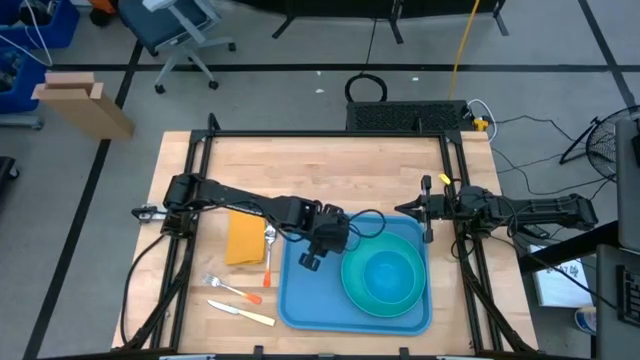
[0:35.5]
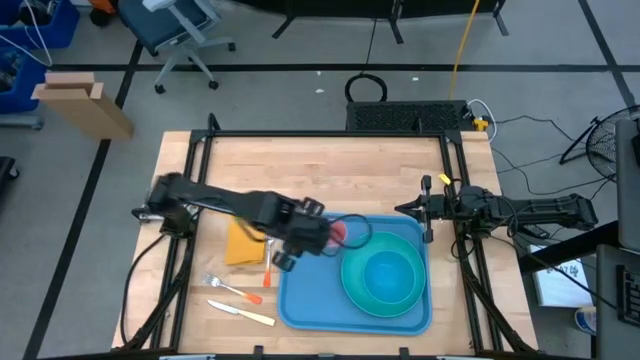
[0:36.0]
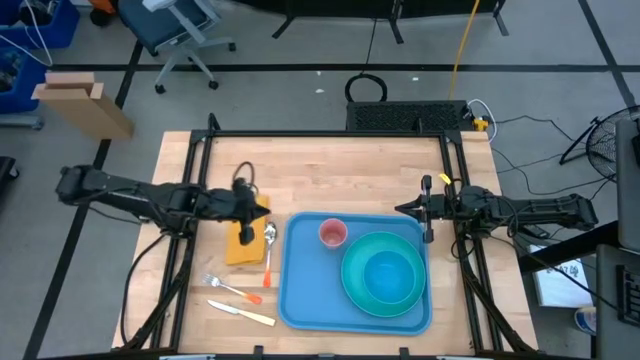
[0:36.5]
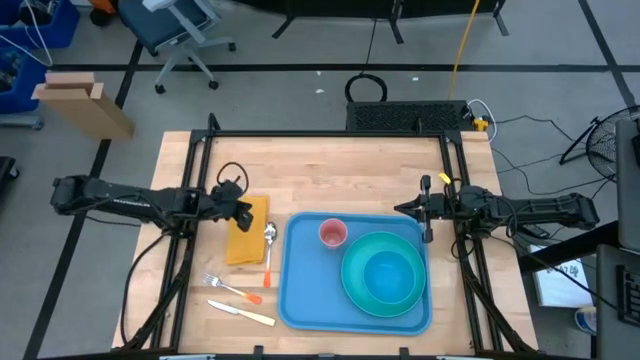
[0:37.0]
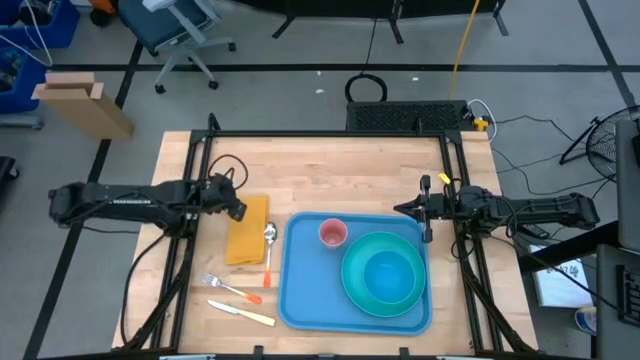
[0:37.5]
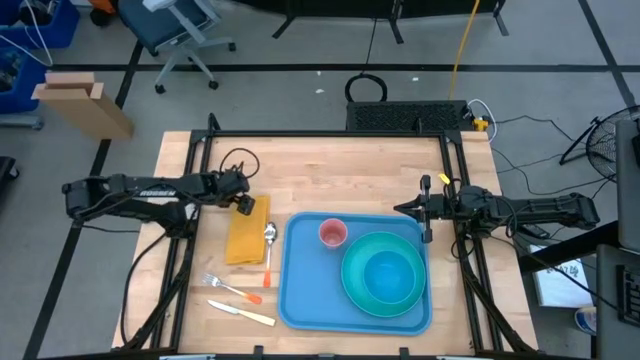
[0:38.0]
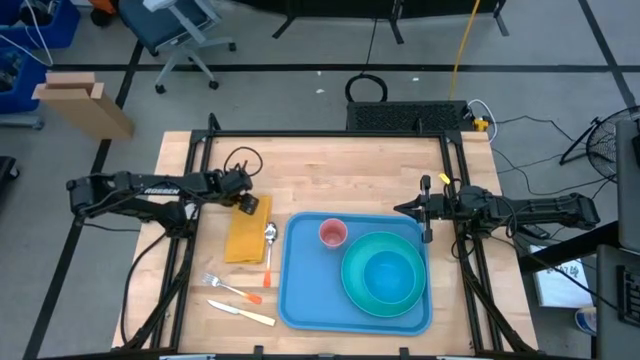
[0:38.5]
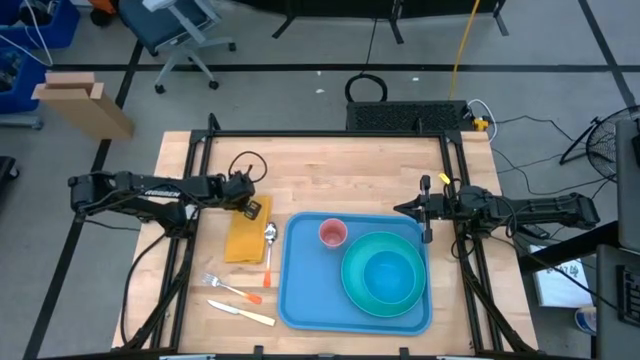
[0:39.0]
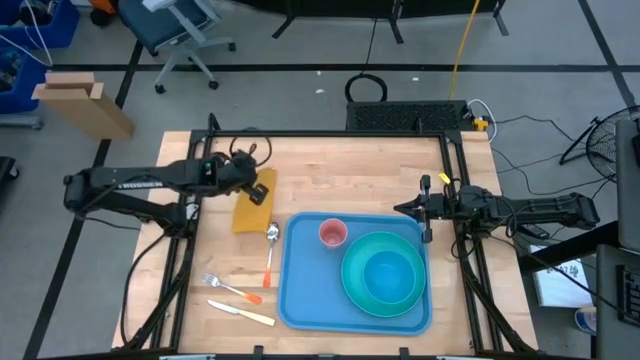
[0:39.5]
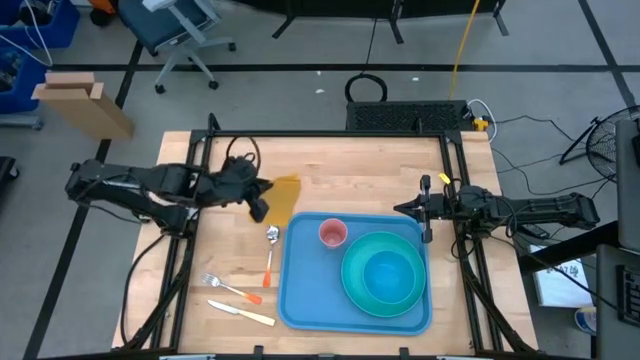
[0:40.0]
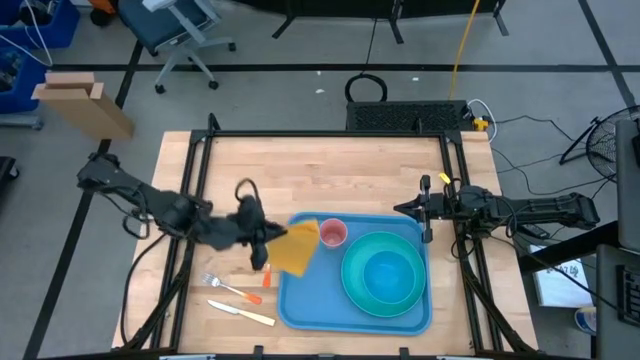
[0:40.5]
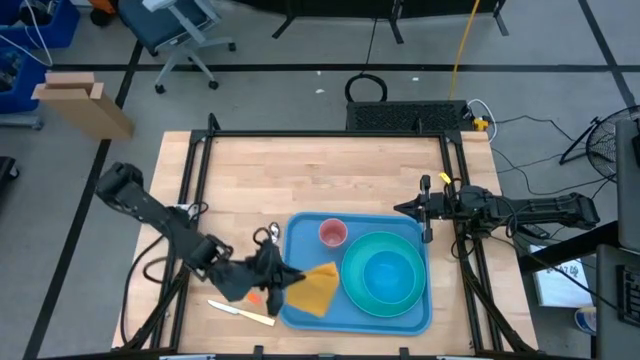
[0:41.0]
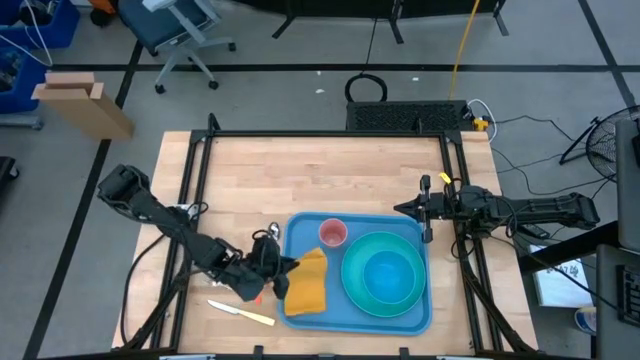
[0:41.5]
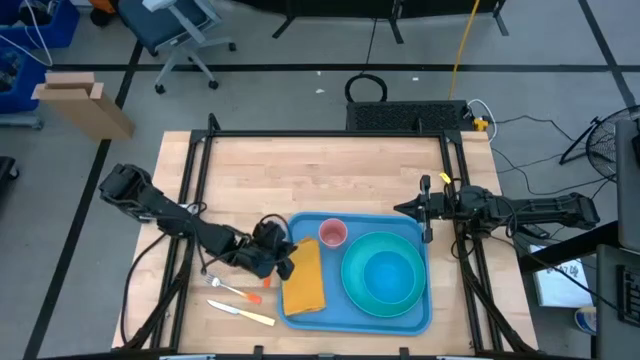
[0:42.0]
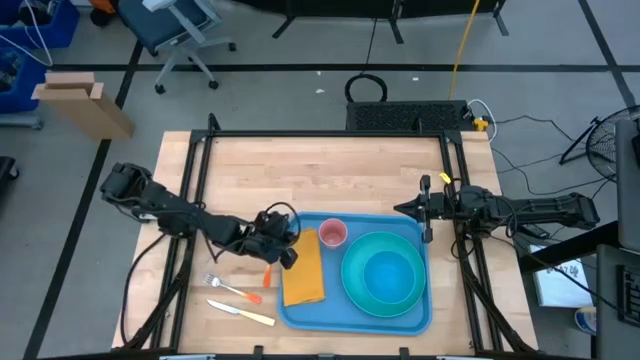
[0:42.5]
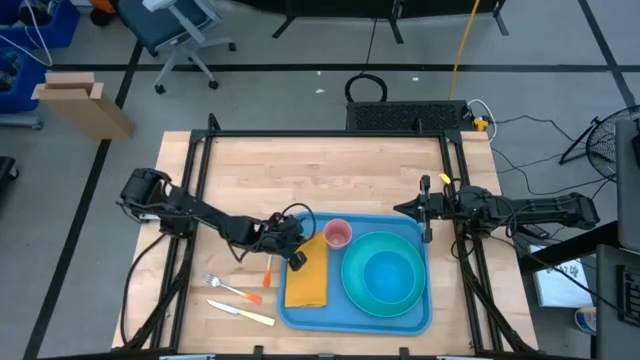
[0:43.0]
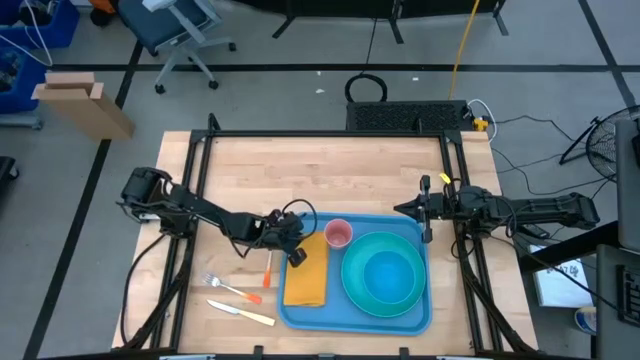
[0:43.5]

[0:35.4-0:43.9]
Task: Set up tray
Put the yellow napkin on the left of the light blue tray

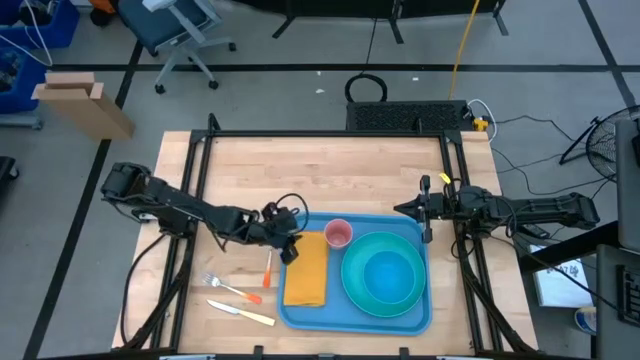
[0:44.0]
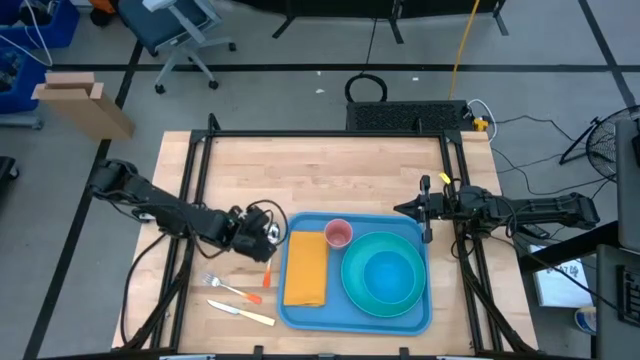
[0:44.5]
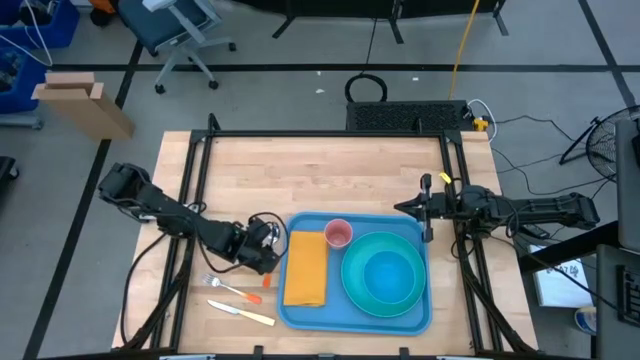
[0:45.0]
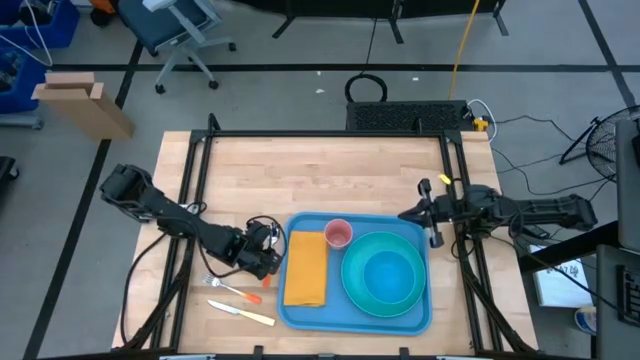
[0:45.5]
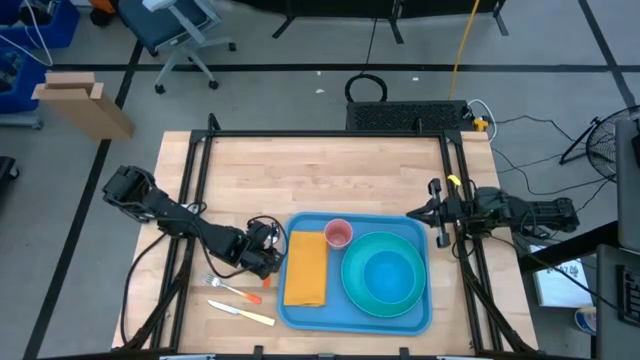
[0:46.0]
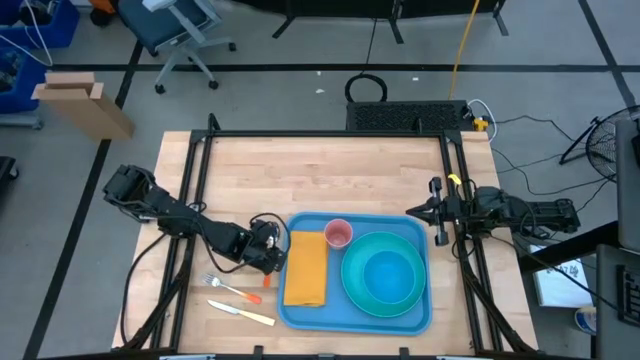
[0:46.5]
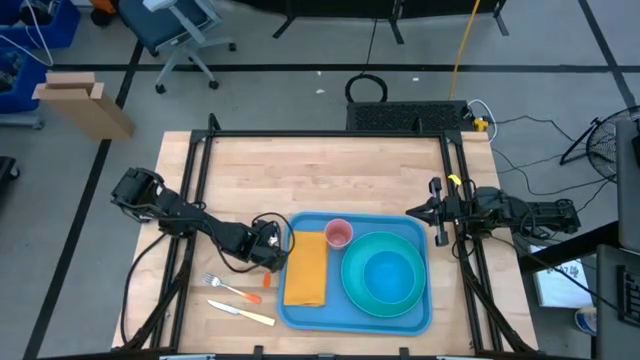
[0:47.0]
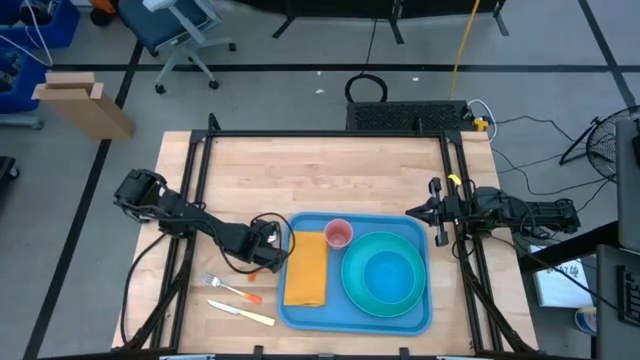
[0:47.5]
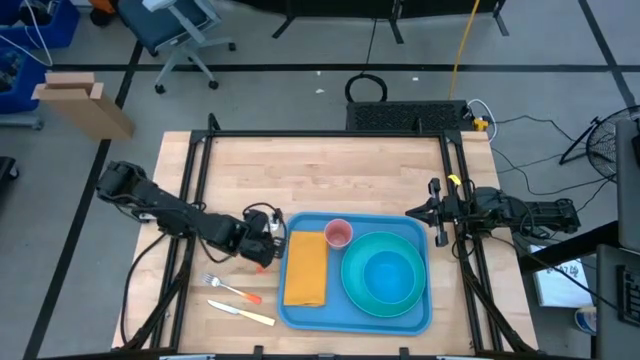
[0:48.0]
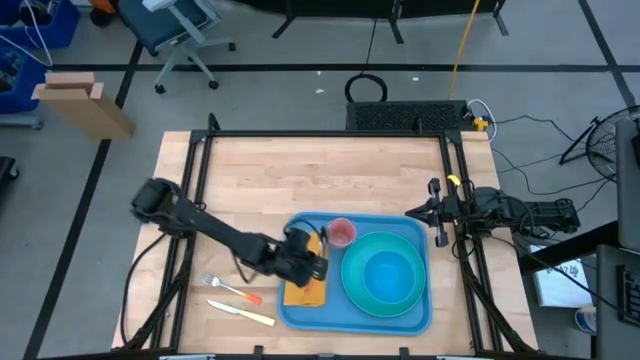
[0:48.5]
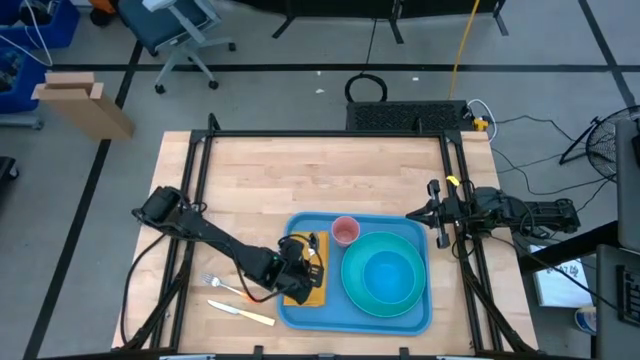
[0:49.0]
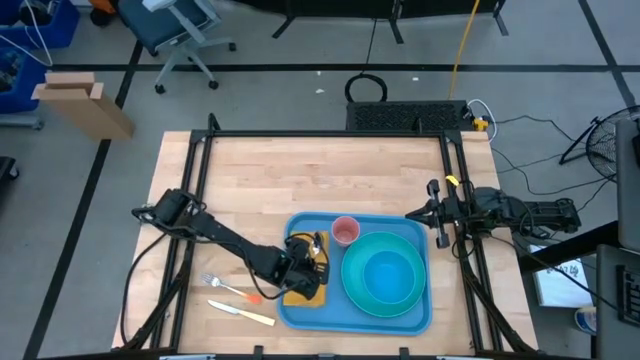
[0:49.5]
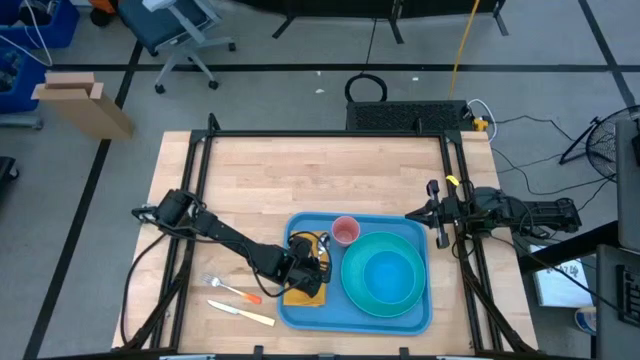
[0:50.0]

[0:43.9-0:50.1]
Put the orange spoon on the yellow napkin

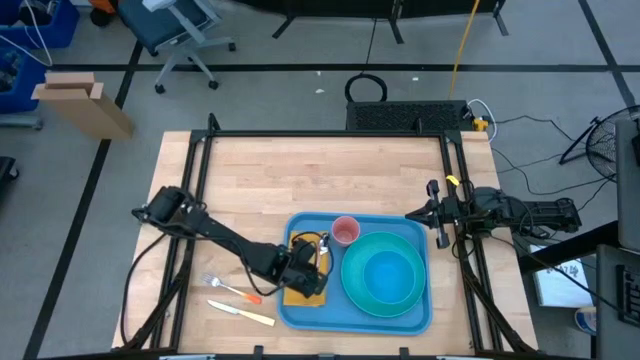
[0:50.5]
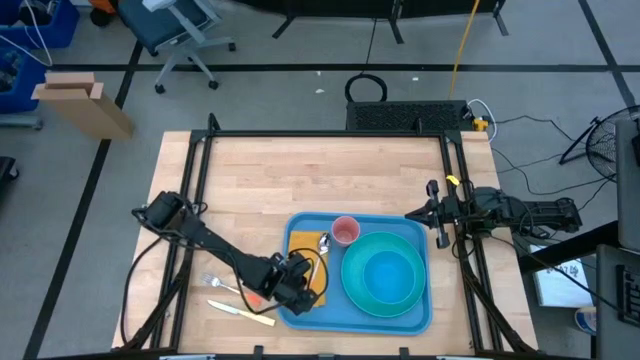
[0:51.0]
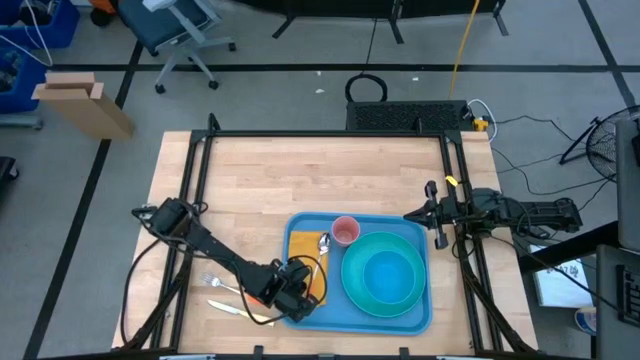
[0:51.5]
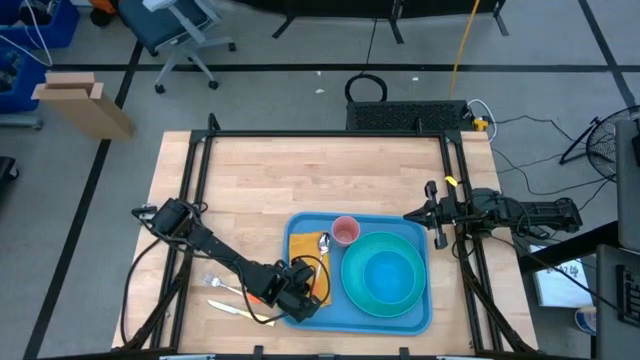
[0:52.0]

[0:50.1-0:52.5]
Adjust the yellow napkin on the light blue tray

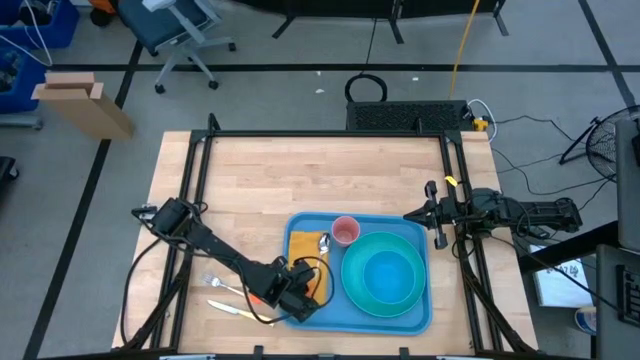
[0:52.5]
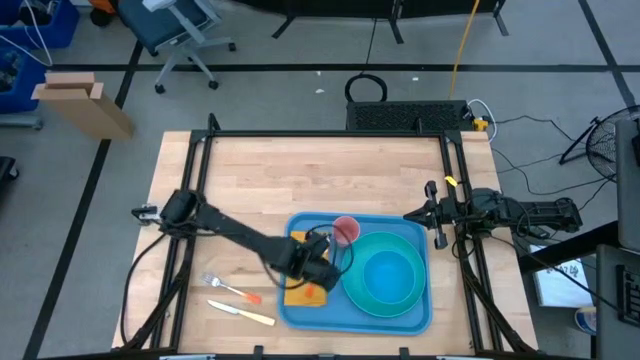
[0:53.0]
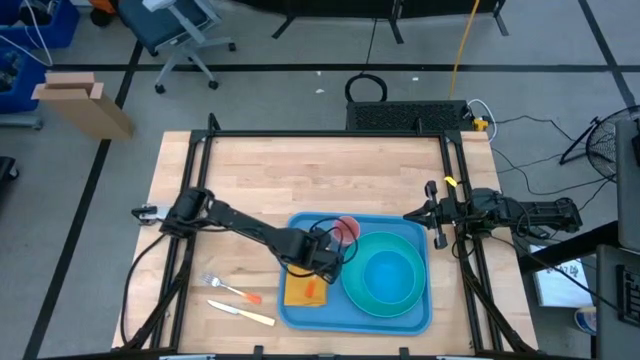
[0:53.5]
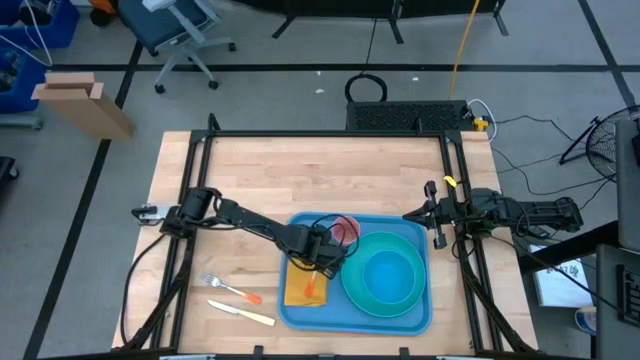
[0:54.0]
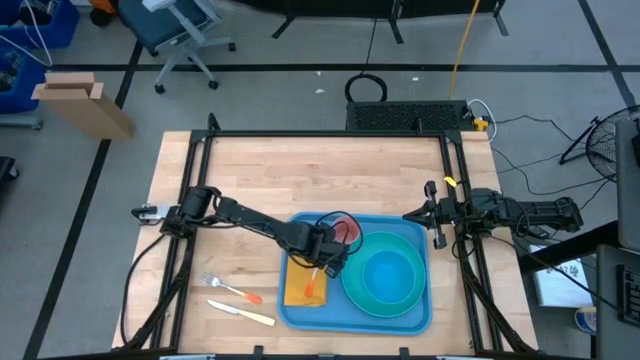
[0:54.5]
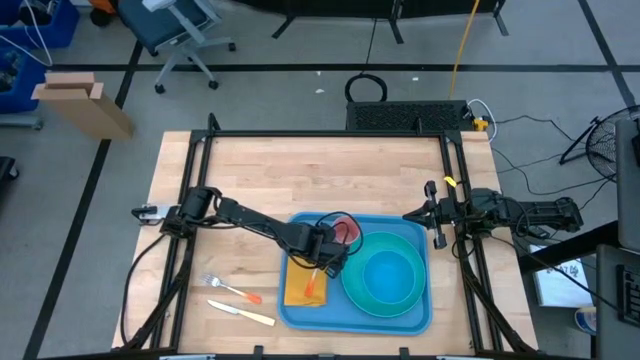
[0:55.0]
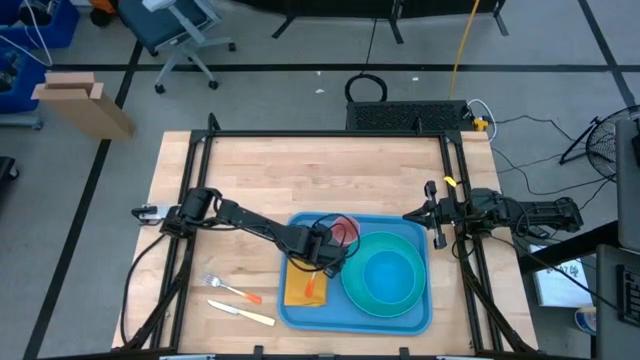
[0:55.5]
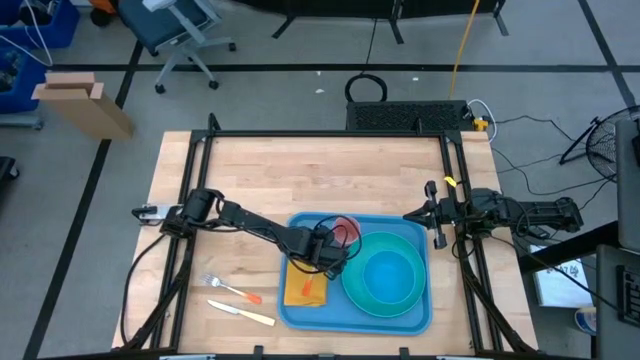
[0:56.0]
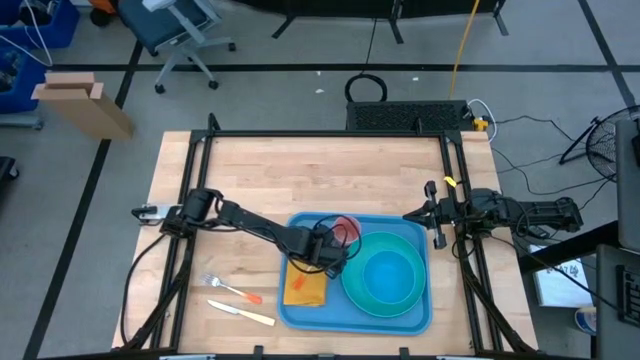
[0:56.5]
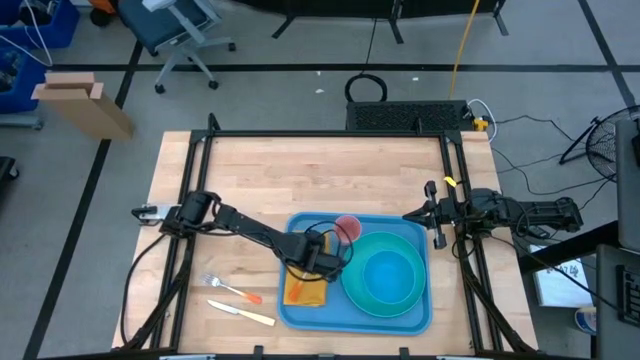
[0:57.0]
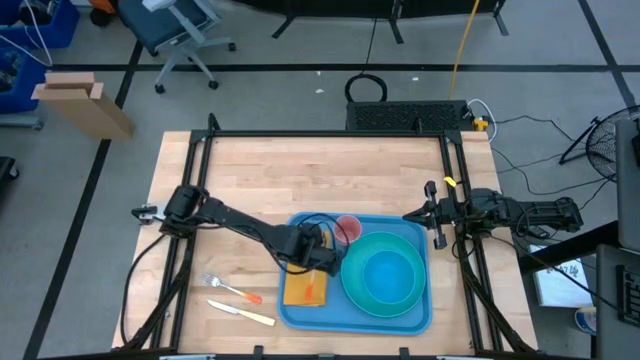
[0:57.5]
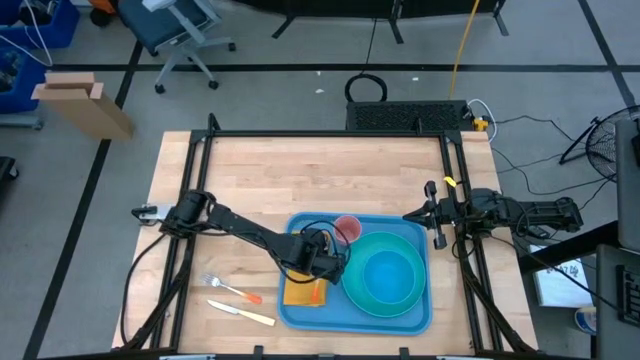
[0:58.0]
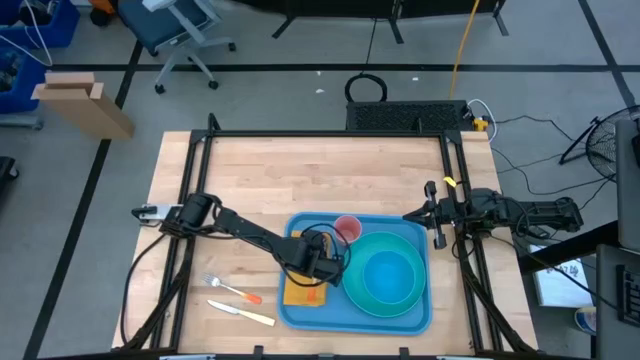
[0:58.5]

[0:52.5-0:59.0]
Adjust the orange spoon on the yellow napkin
